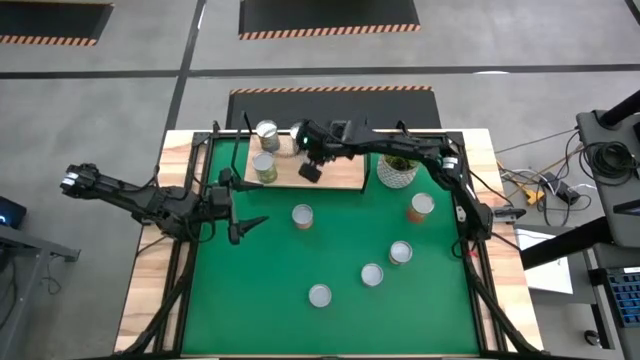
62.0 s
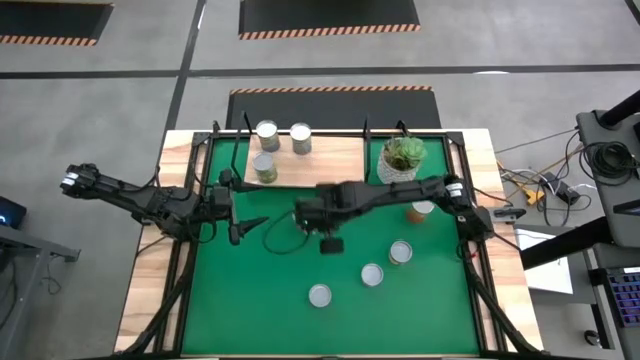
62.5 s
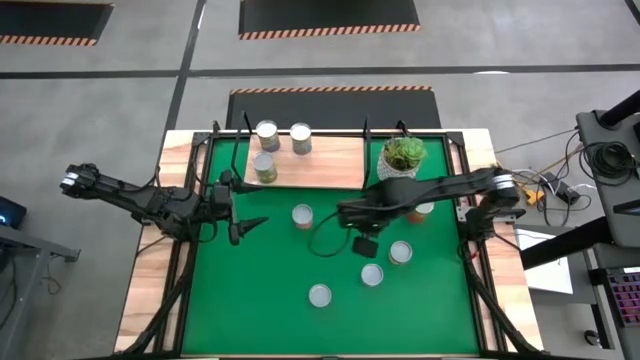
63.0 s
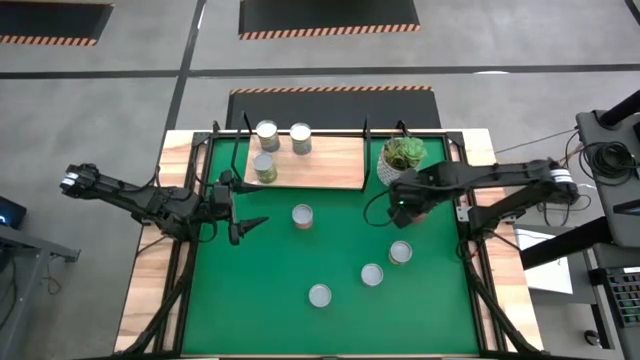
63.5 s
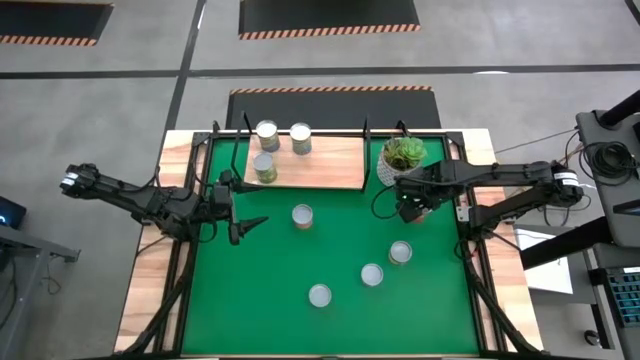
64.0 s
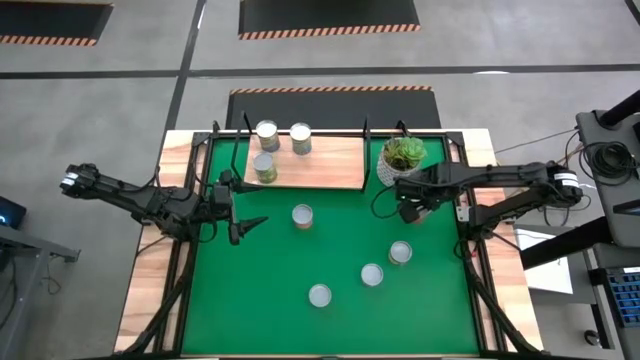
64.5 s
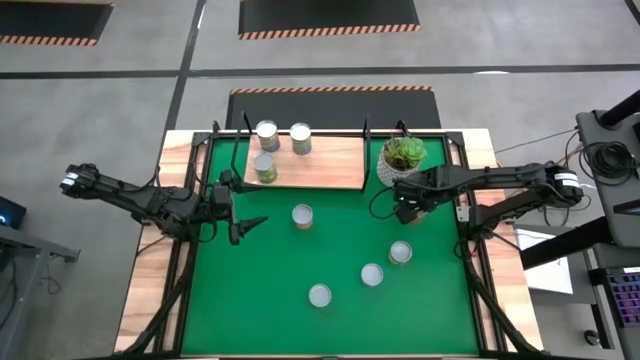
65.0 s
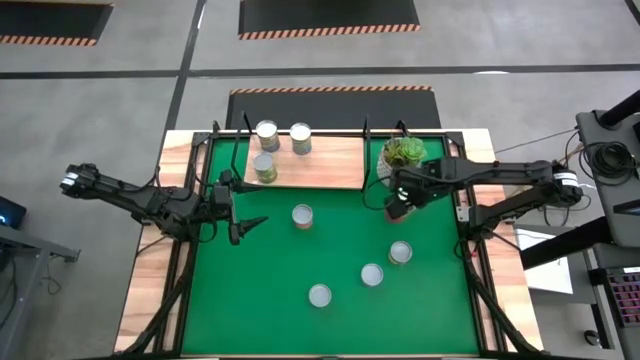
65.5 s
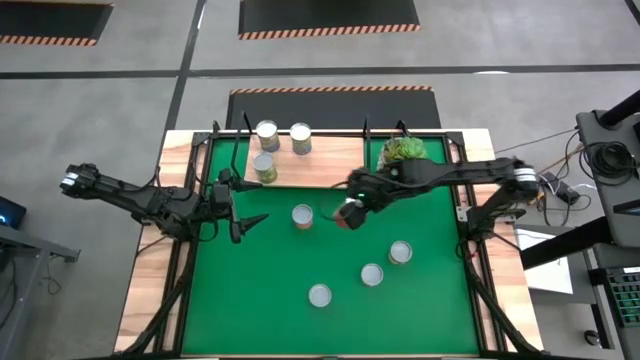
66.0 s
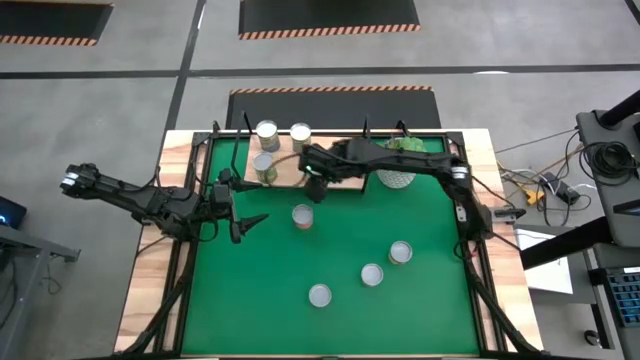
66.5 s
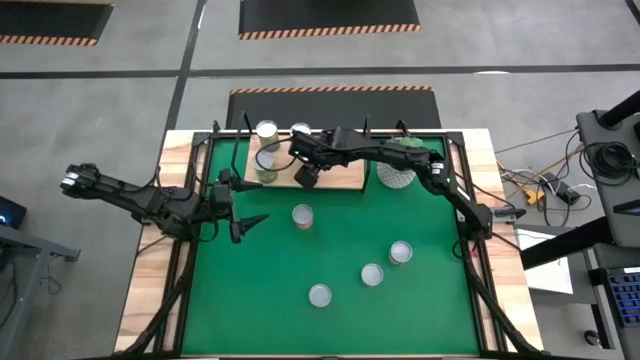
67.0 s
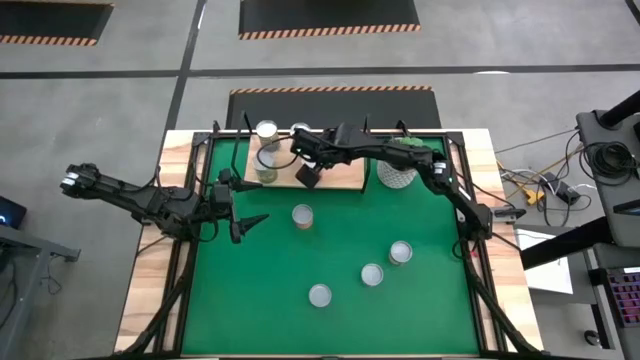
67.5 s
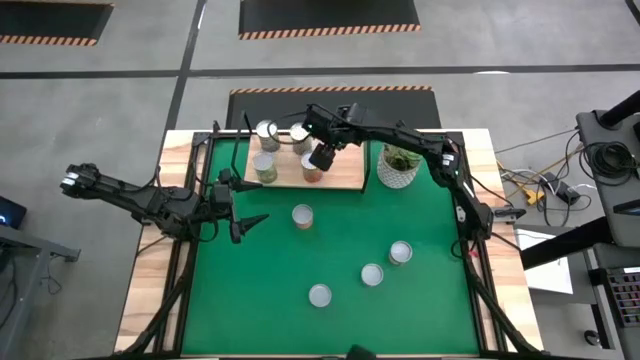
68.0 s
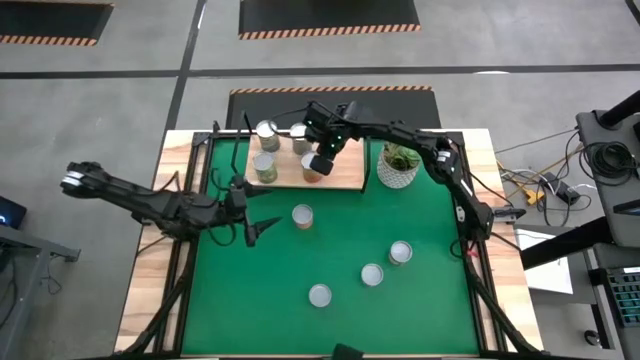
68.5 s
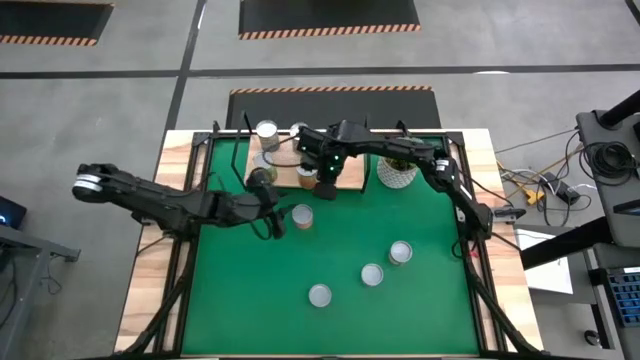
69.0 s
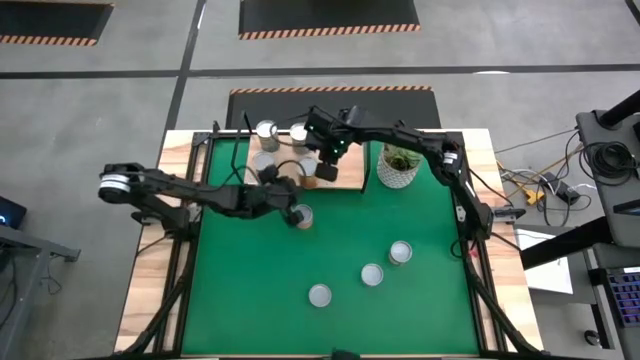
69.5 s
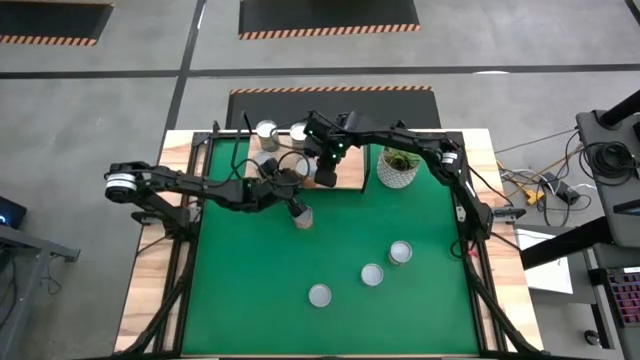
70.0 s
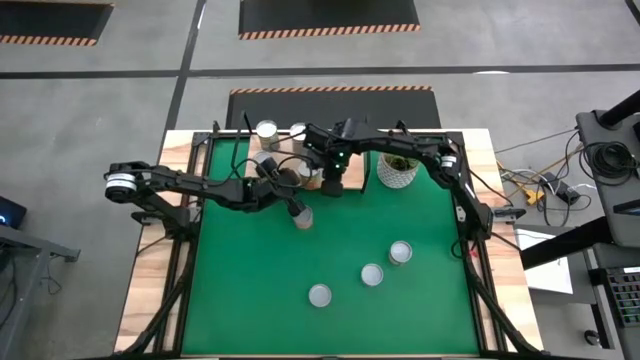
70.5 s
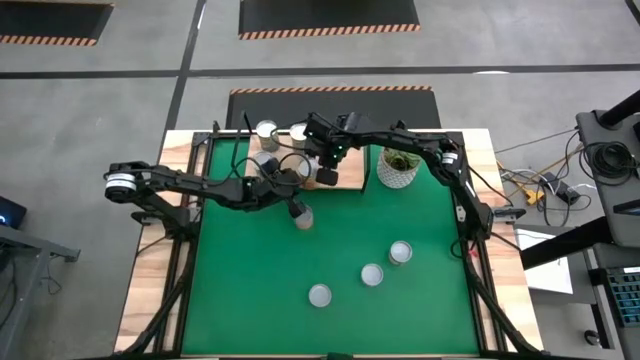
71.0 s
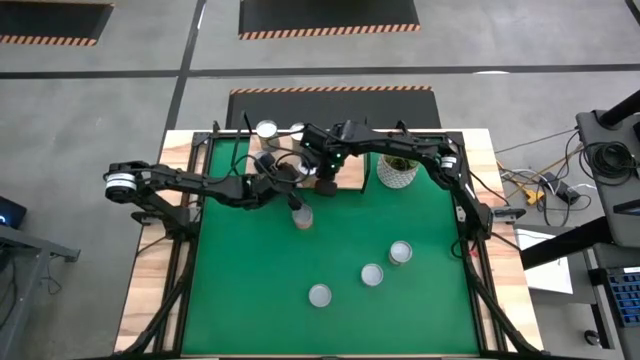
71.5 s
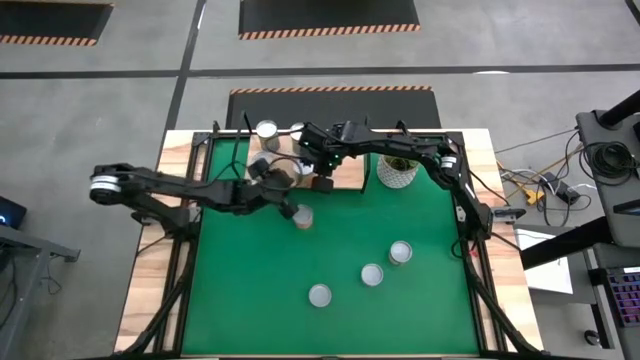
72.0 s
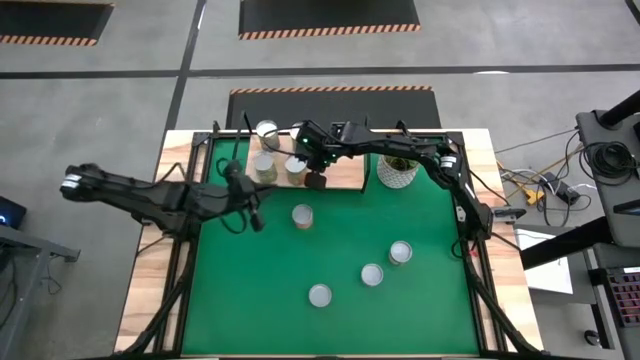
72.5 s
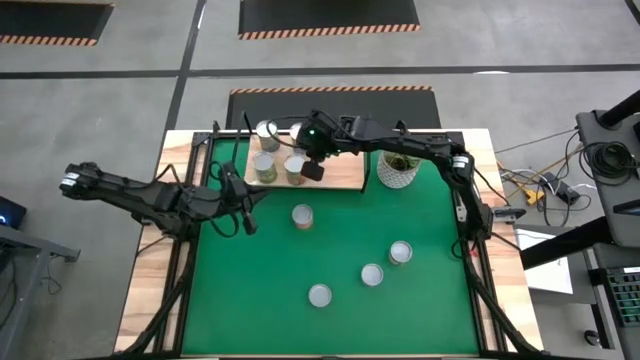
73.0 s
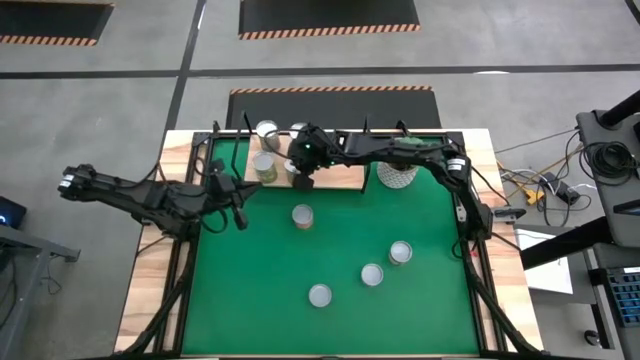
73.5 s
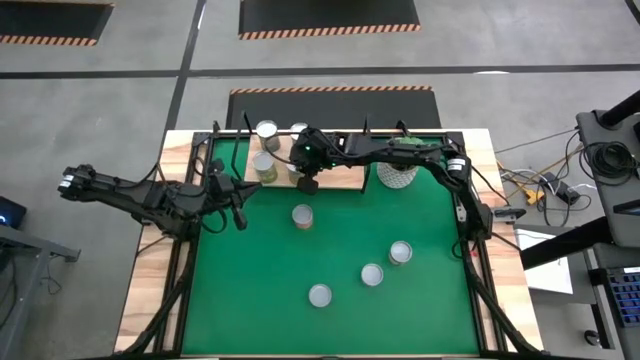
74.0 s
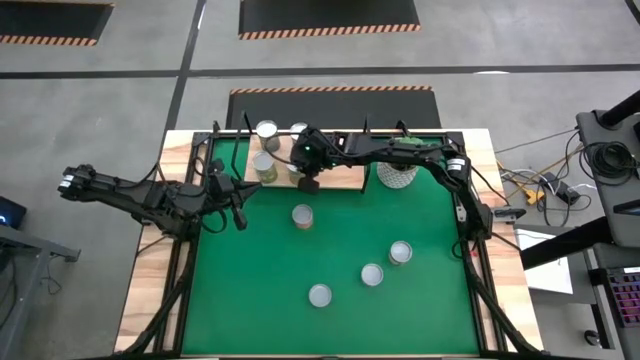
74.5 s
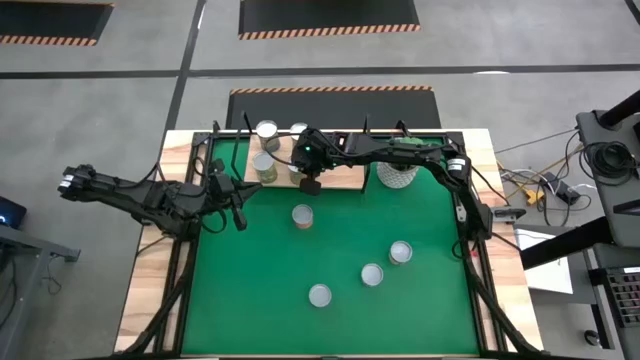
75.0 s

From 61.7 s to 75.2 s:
Task: Pick and place cans onto a shelf
Put the canned pineapple on the shelf

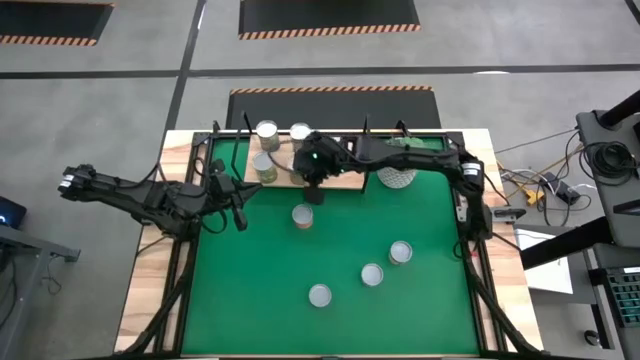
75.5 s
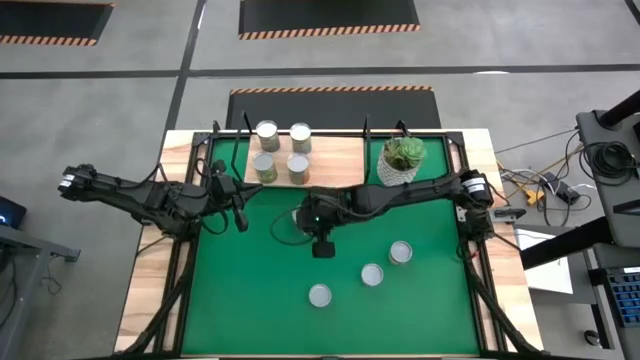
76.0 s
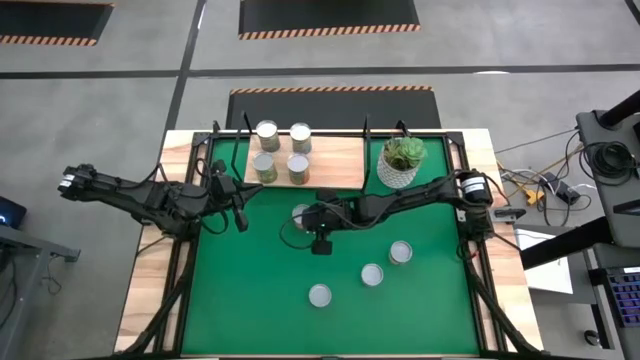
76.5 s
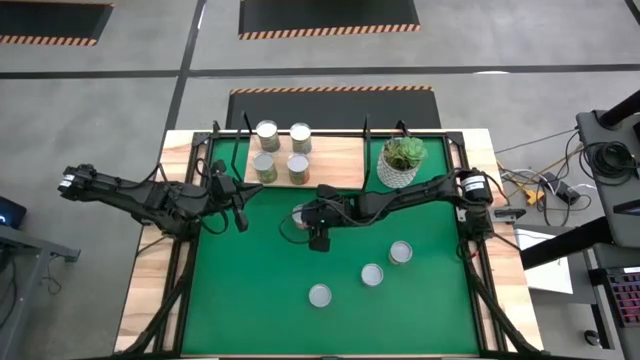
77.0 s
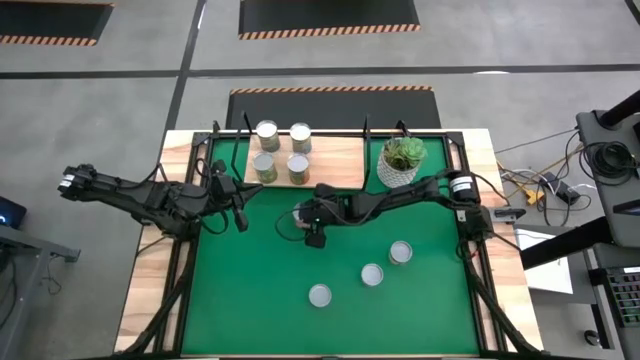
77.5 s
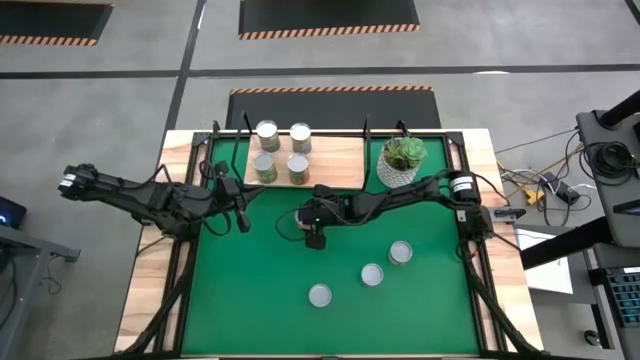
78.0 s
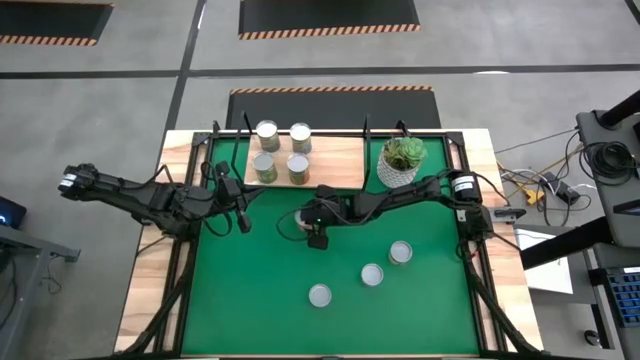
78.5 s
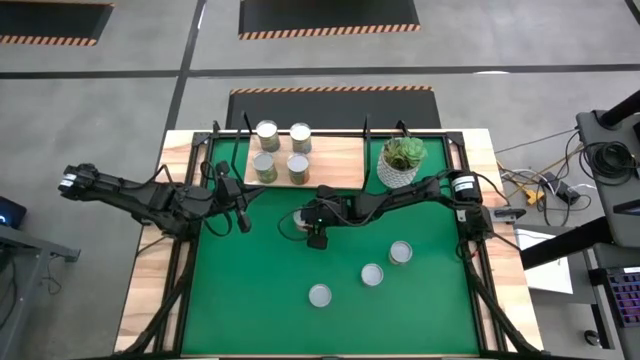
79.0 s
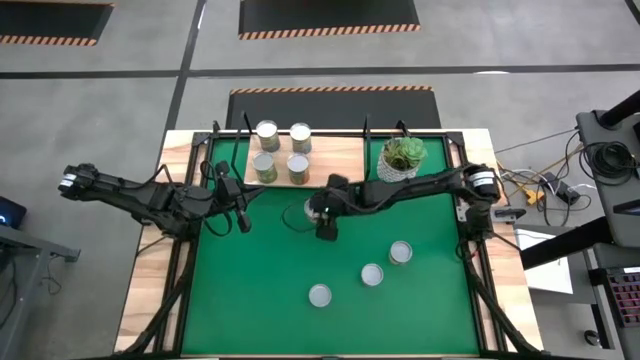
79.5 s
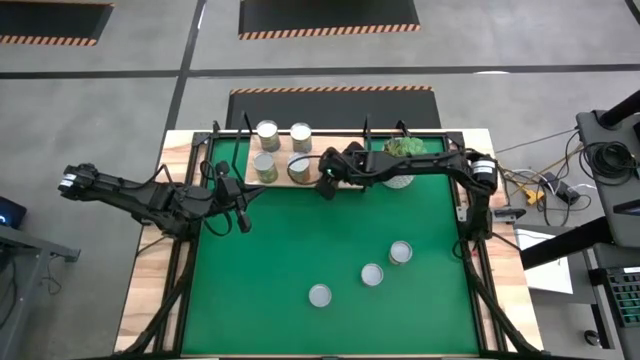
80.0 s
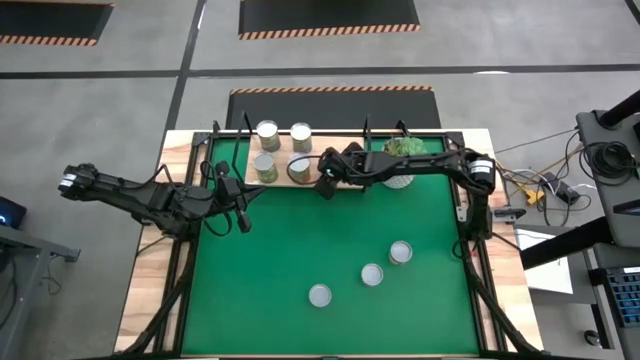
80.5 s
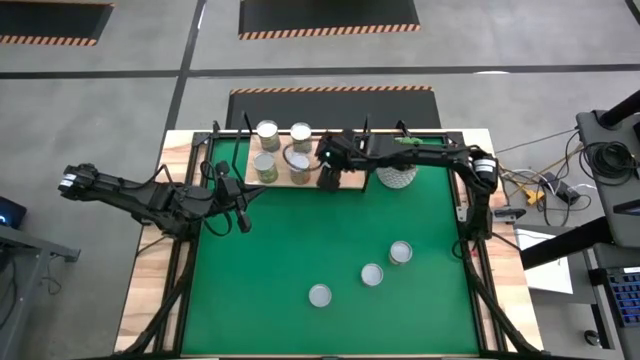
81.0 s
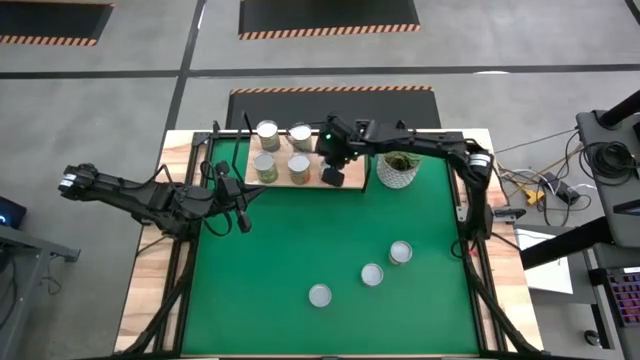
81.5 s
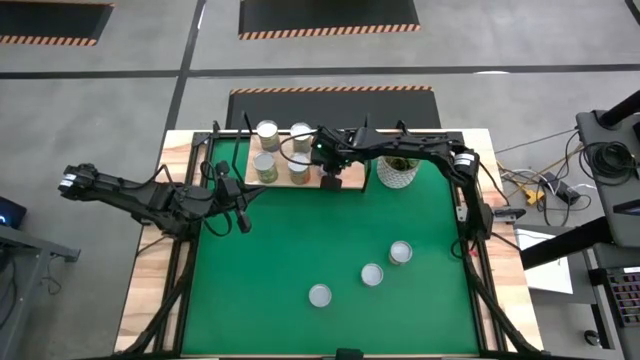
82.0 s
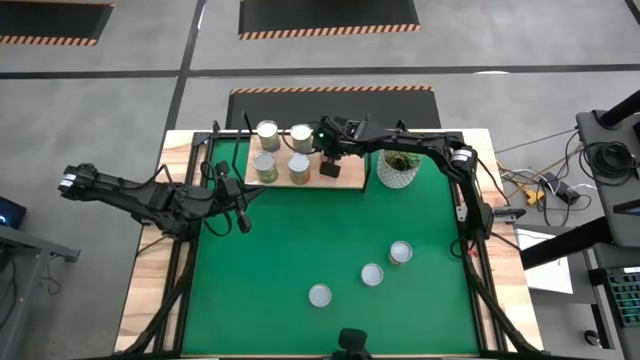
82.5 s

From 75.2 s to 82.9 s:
Put the canned orange tuna on the shelf

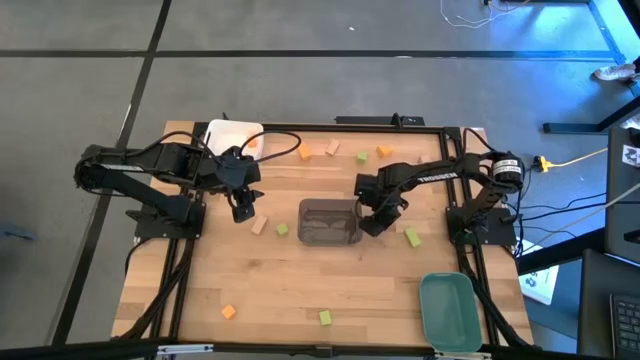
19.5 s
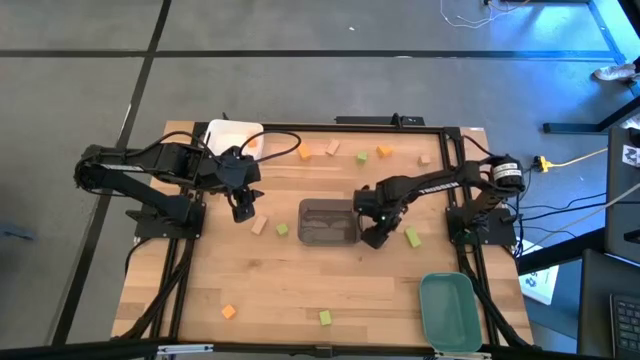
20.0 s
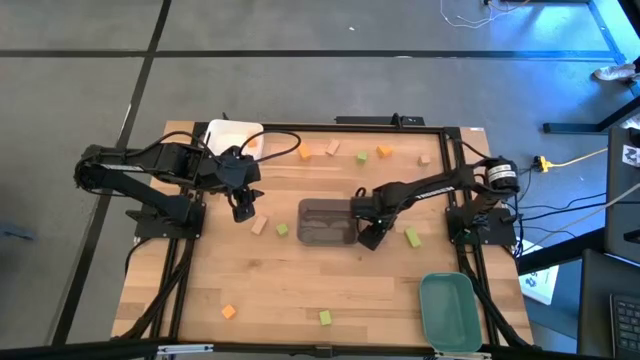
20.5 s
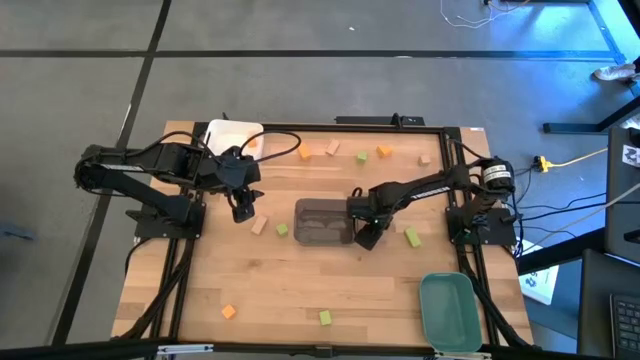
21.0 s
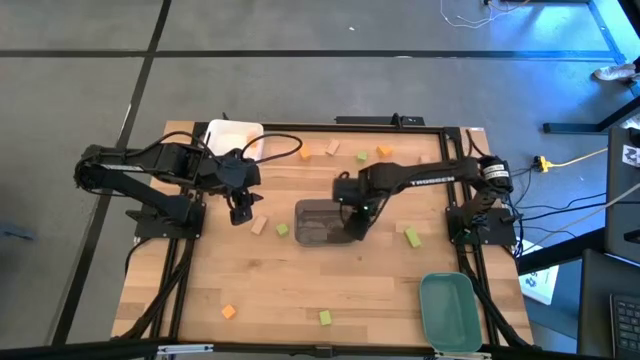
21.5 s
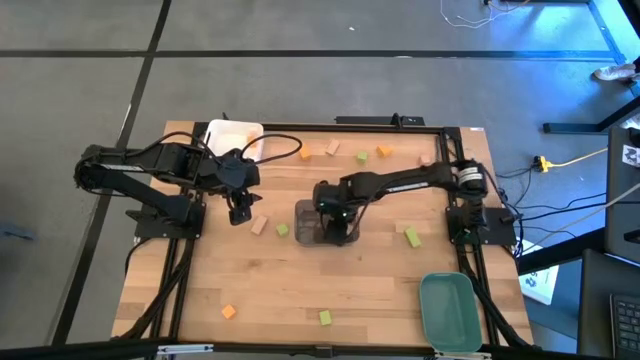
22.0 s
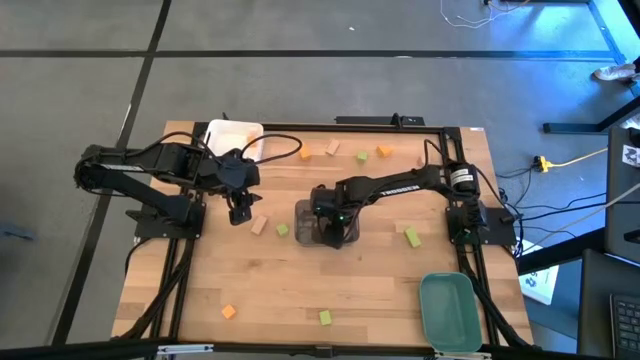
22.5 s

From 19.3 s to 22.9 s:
Task: Sort & place blocks by color
Put the brown block into the black bin
